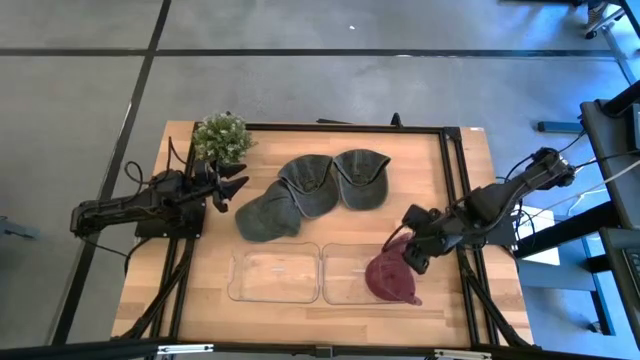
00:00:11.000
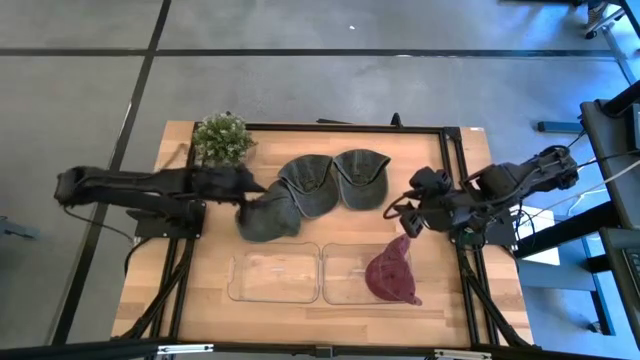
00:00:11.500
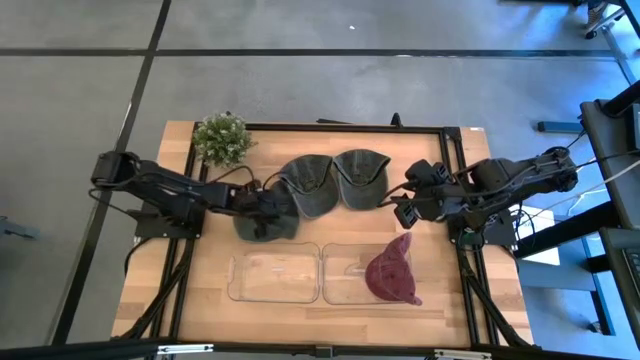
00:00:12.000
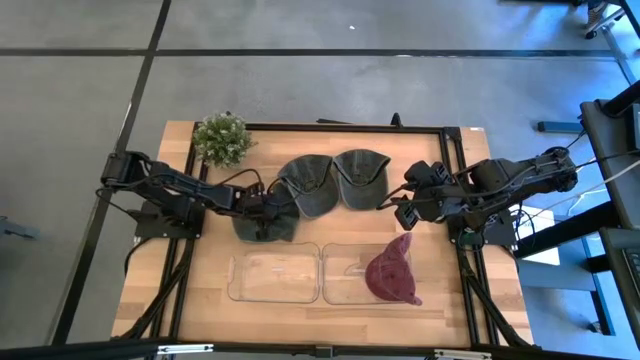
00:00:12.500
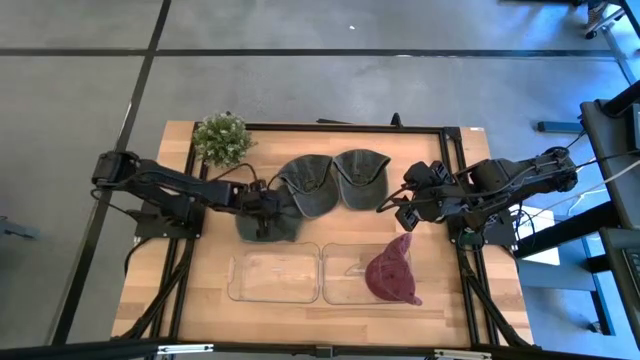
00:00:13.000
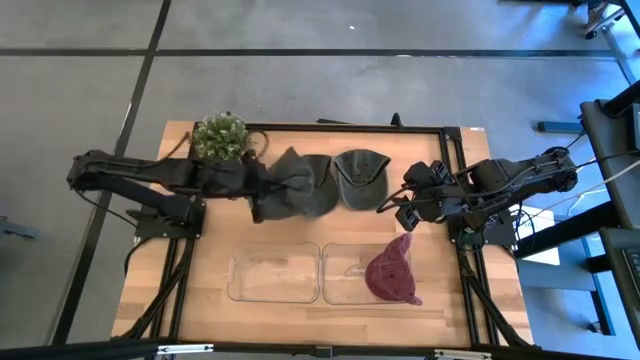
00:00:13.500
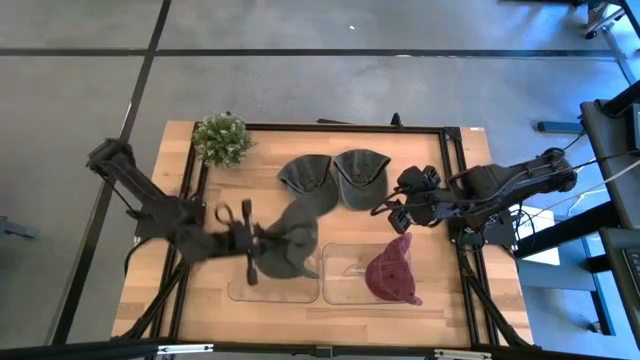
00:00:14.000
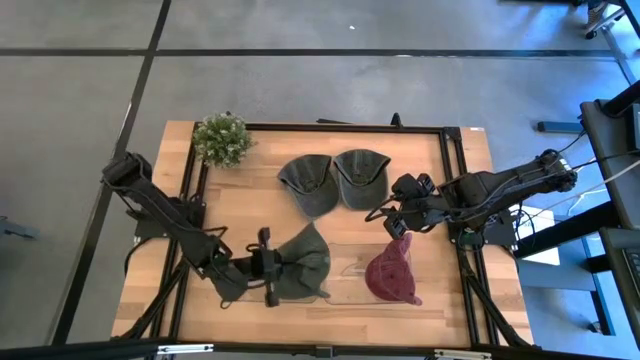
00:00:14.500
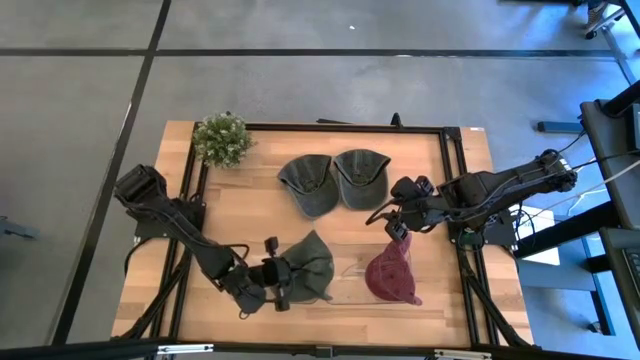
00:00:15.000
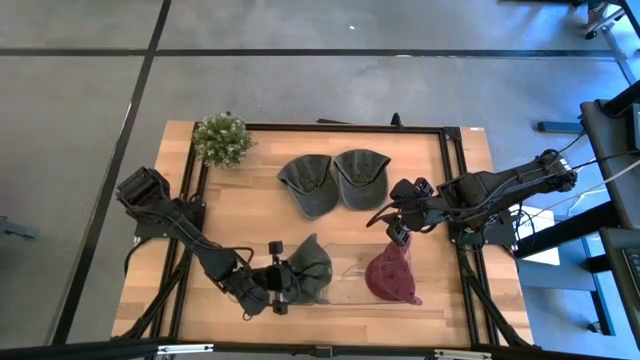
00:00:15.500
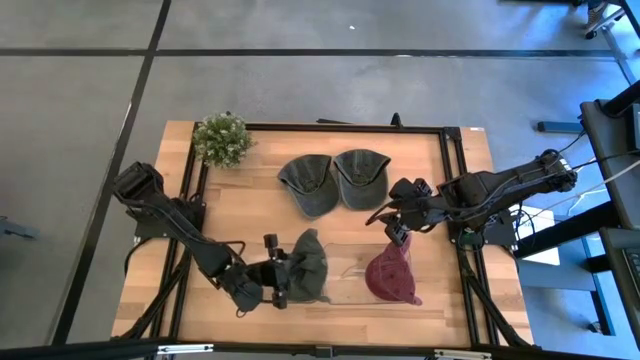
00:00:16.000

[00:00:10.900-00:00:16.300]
Task: Pick & Place hat
Put the left grey cap into the left transparent bin

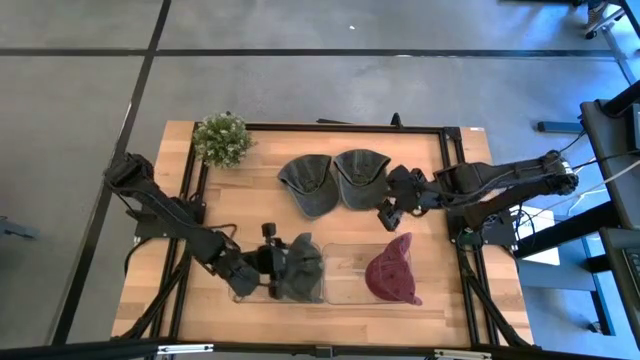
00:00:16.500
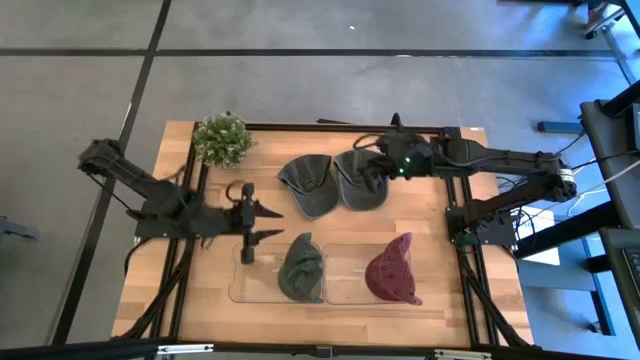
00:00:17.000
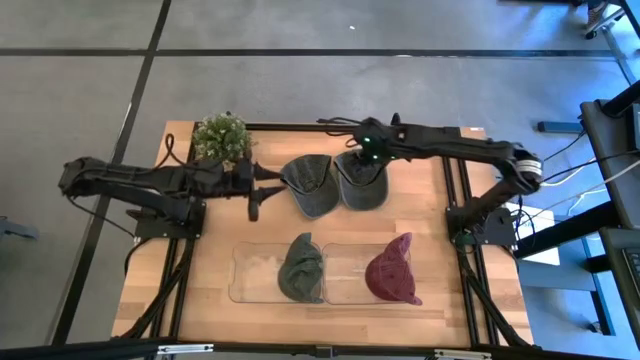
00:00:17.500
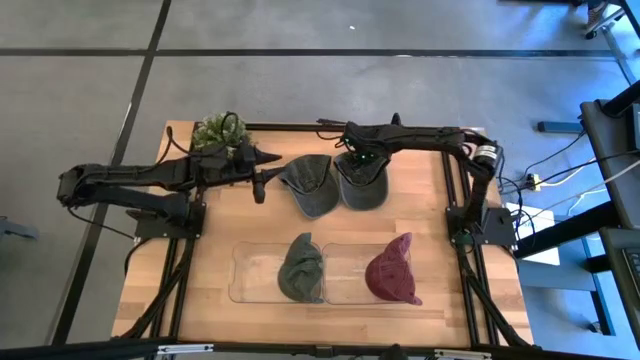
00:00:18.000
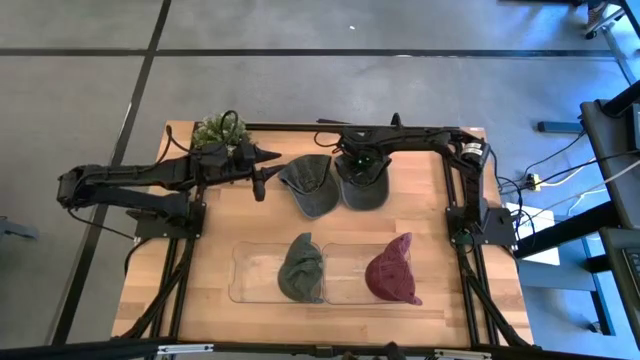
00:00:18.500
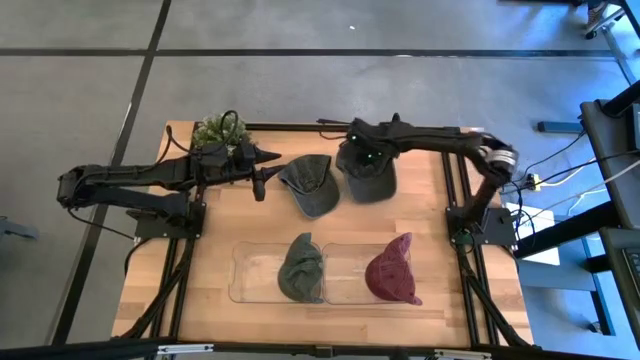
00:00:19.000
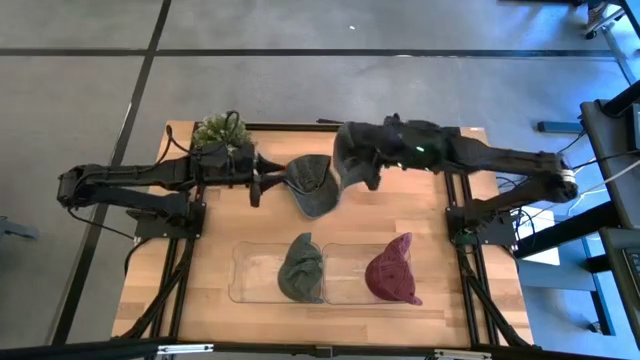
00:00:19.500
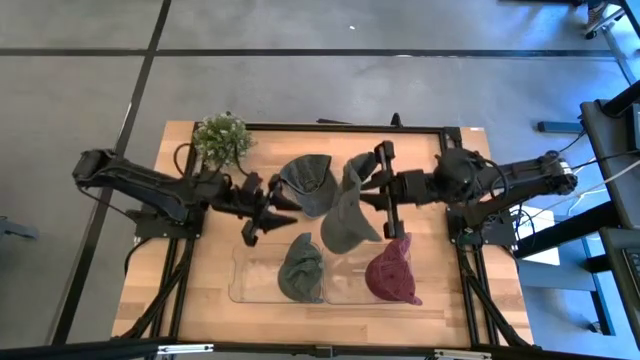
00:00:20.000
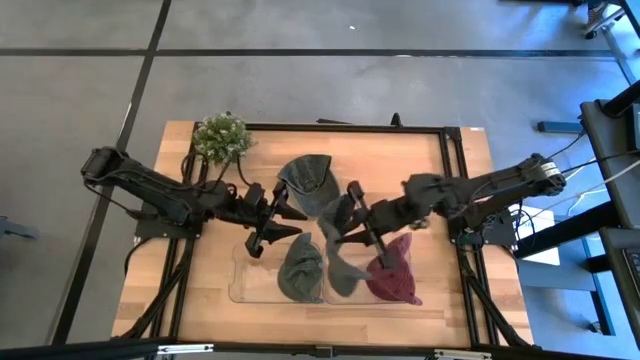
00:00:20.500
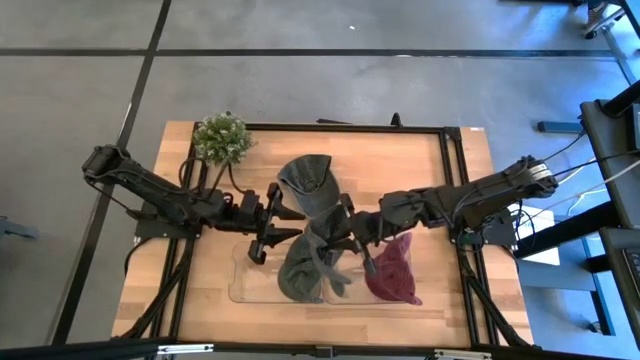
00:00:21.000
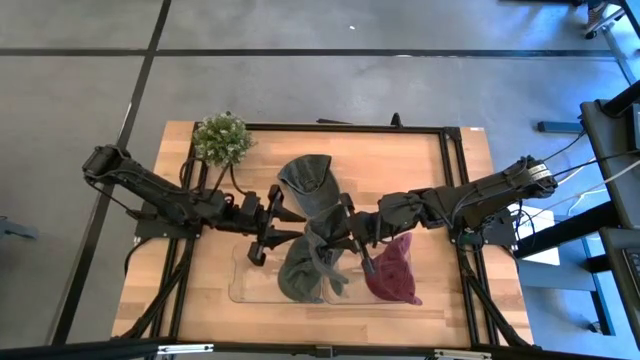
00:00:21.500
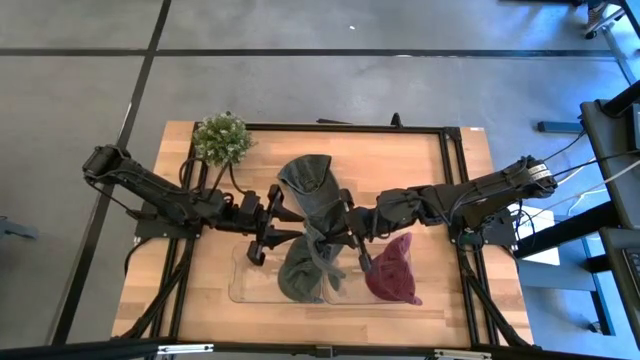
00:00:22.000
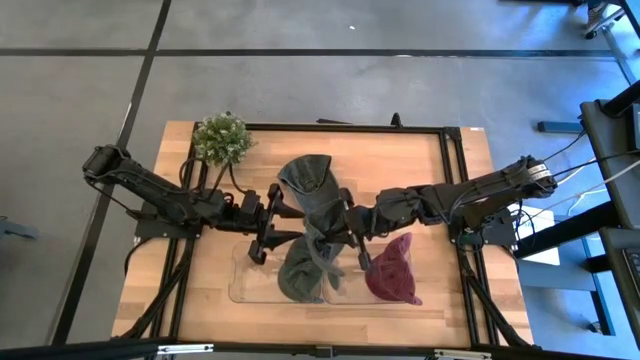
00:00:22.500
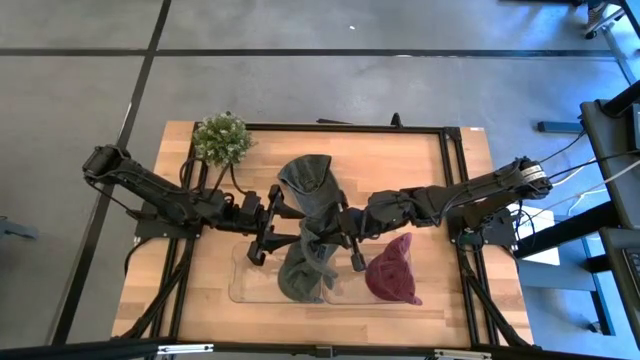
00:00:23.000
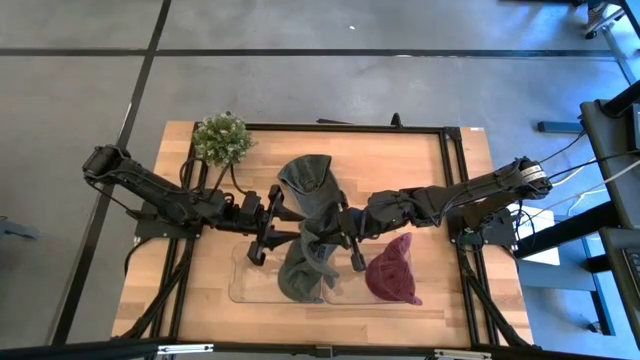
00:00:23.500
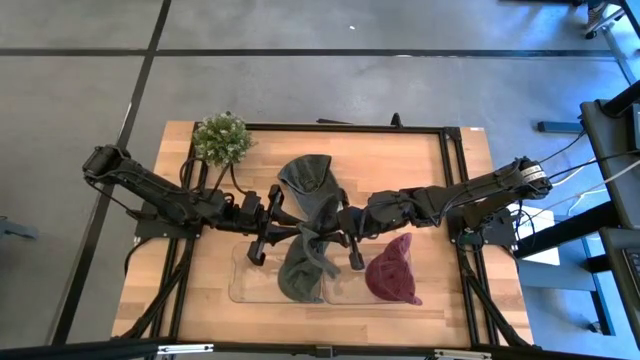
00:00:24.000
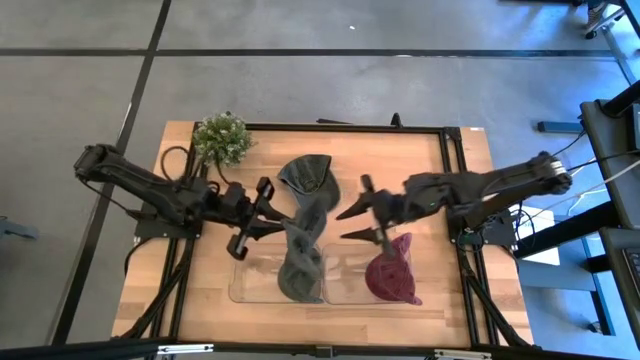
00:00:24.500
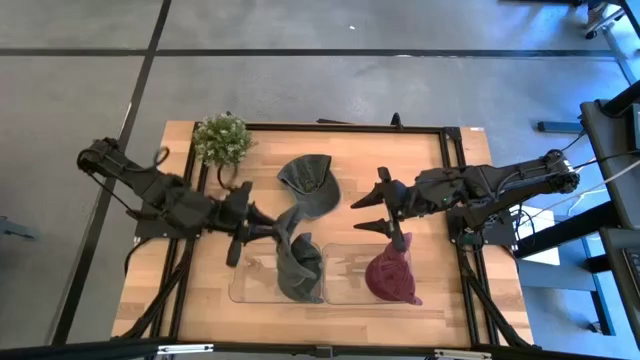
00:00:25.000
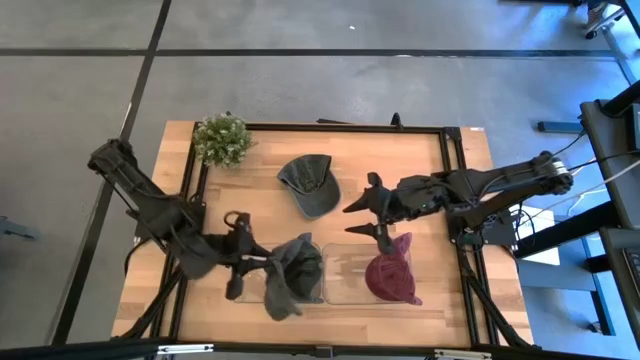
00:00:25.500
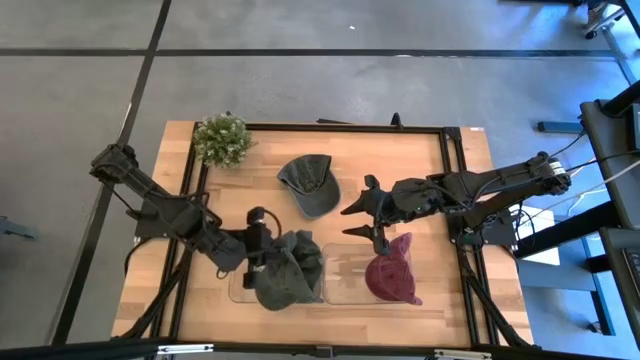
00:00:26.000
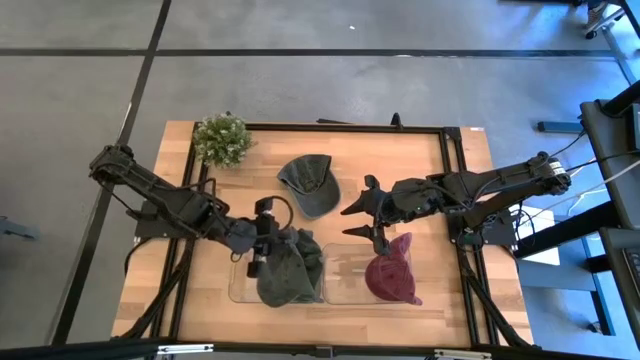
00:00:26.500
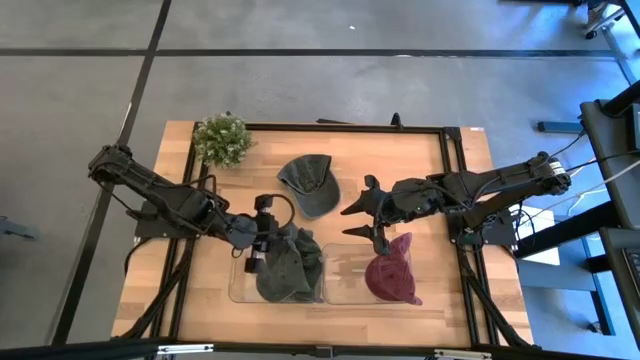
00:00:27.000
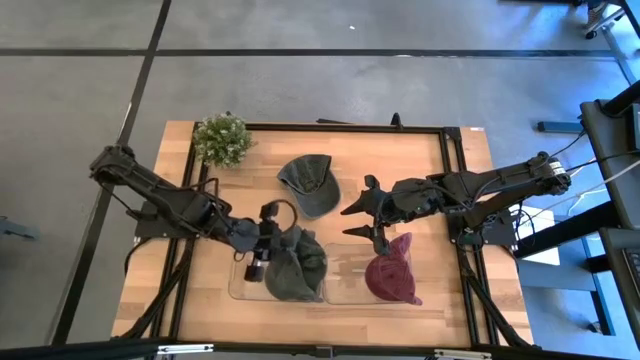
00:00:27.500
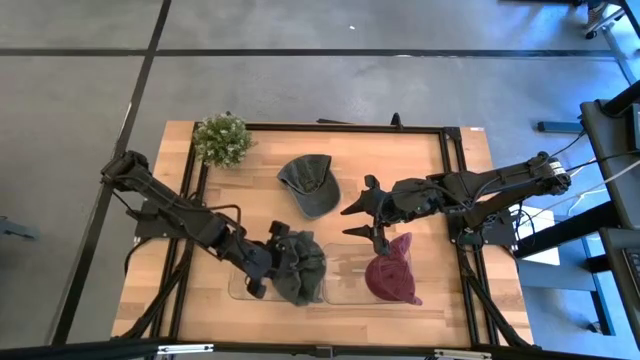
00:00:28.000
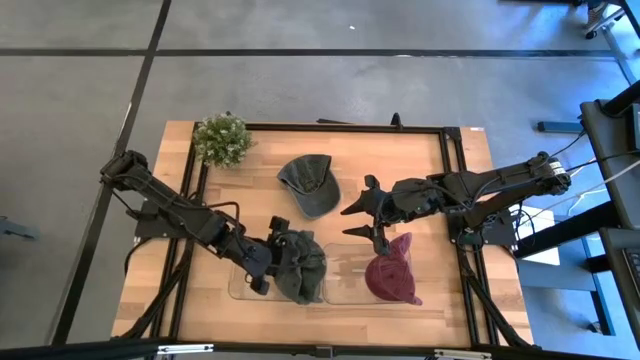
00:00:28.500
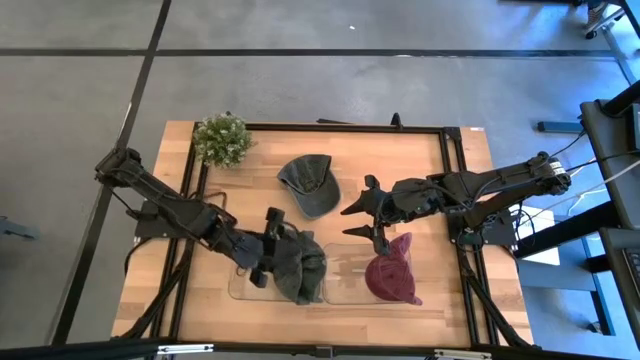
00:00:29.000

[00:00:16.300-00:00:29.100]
Put the right grey cap into the left transparent bin

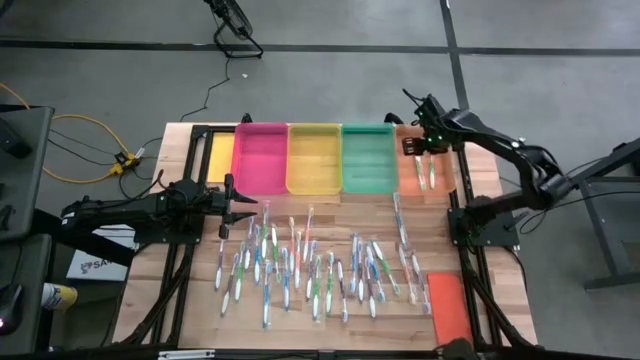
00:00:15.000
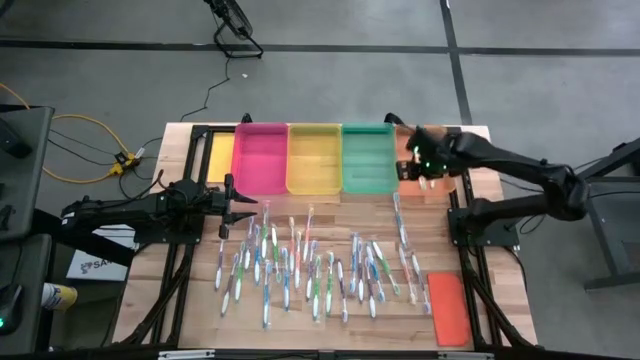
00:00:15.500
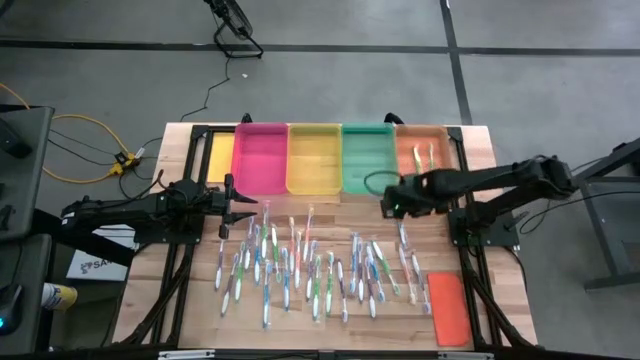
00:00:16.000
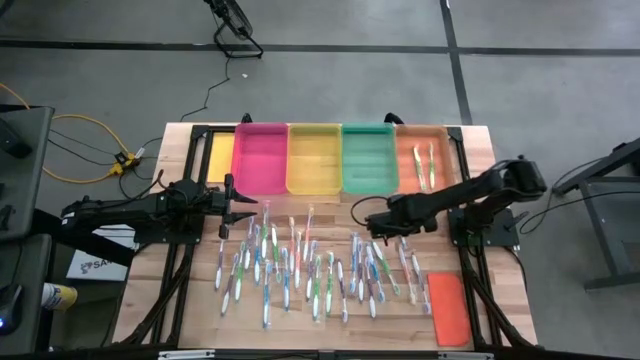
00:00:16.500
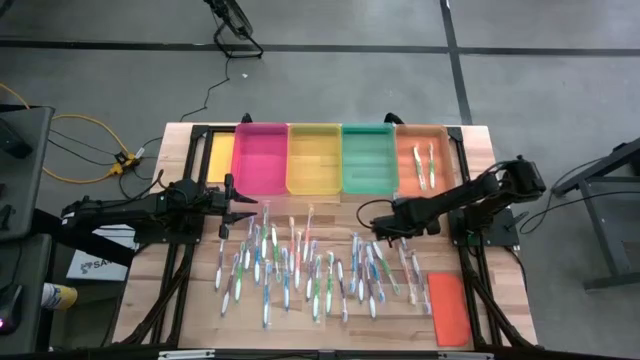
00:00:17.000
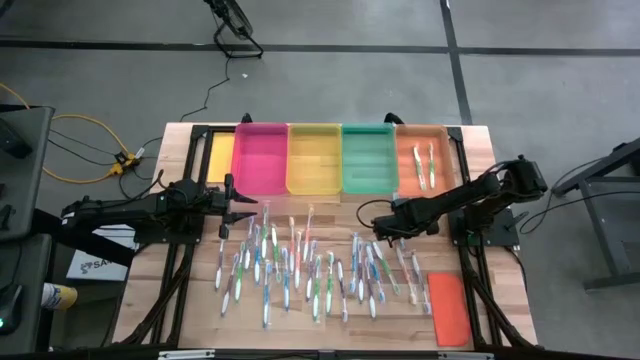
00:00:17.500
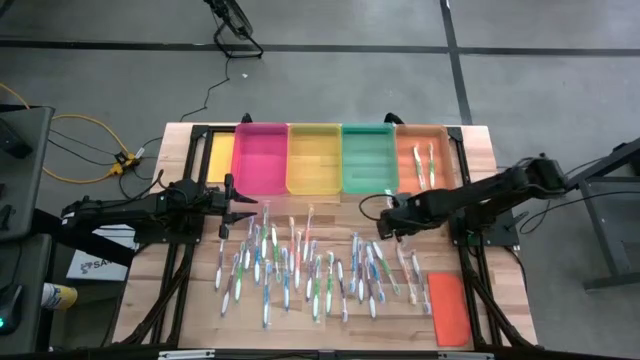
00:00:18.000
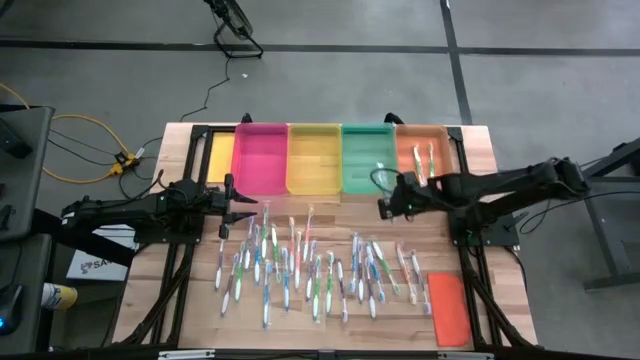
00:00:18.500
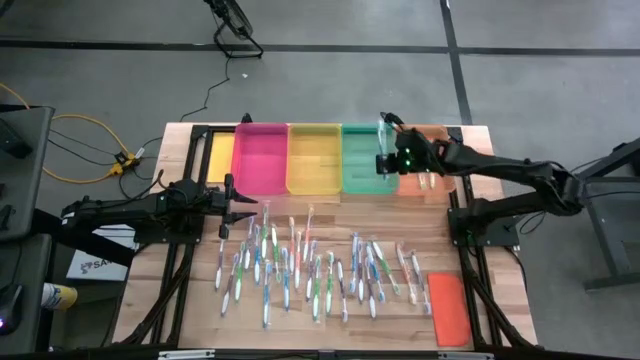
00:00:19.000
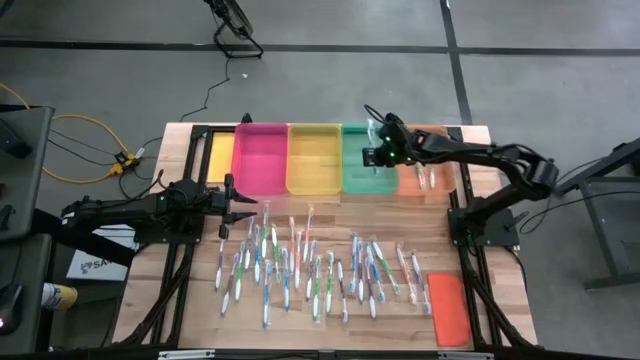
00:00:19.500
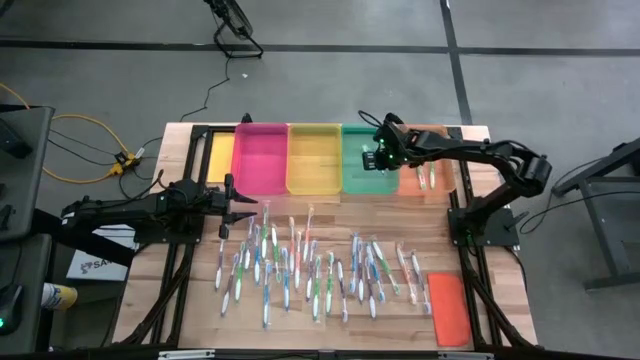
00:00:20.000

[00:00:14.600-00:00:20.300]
Task: Pick & Place Toothbrushes
Put the blue toothbrush into the green bin
